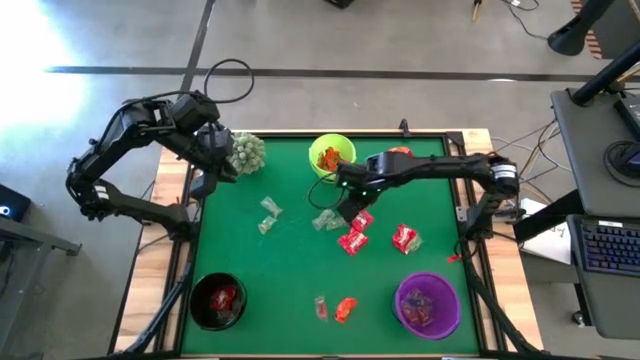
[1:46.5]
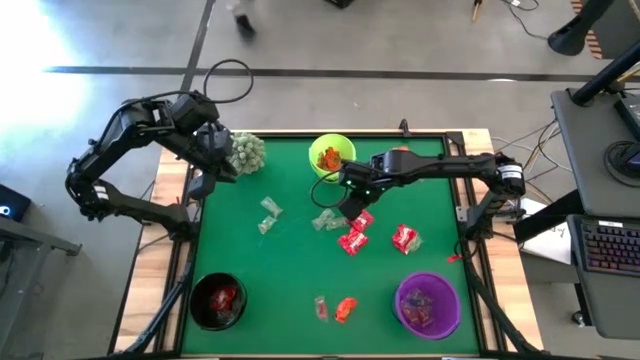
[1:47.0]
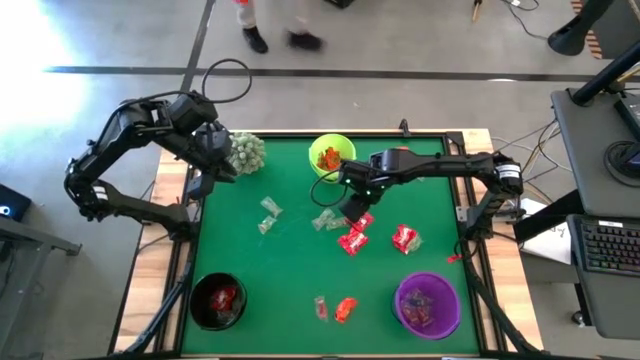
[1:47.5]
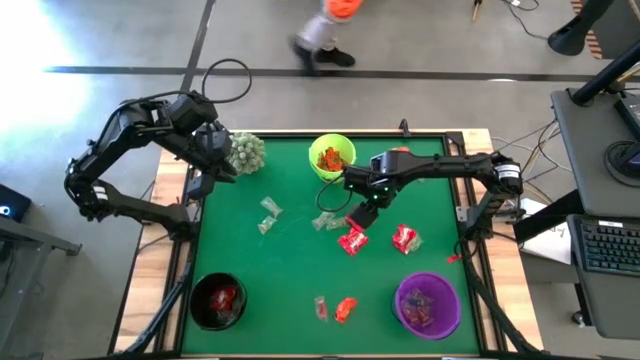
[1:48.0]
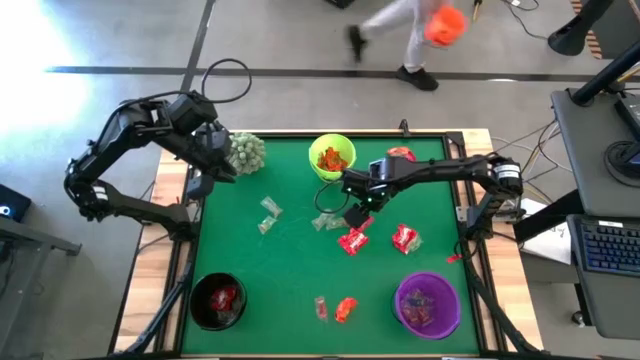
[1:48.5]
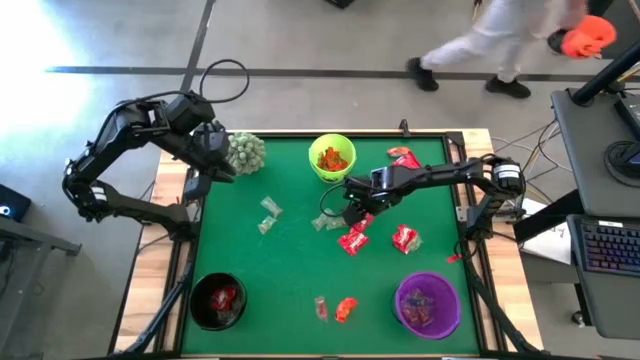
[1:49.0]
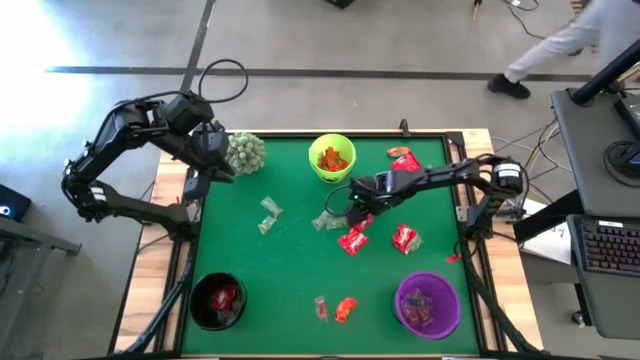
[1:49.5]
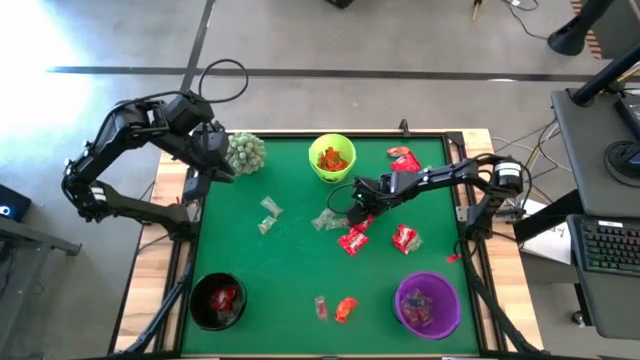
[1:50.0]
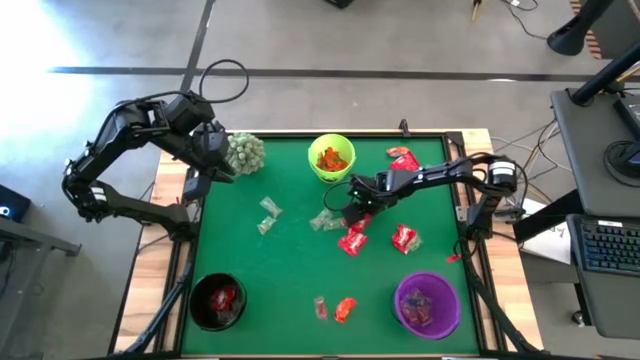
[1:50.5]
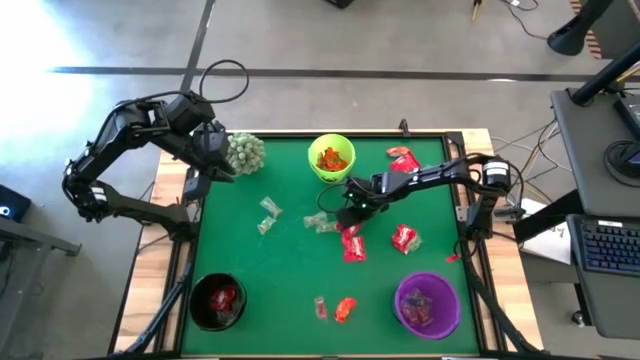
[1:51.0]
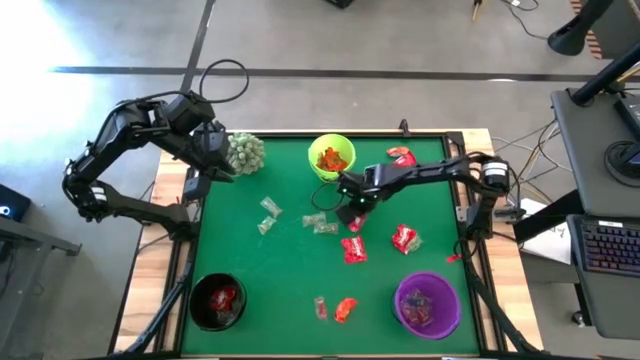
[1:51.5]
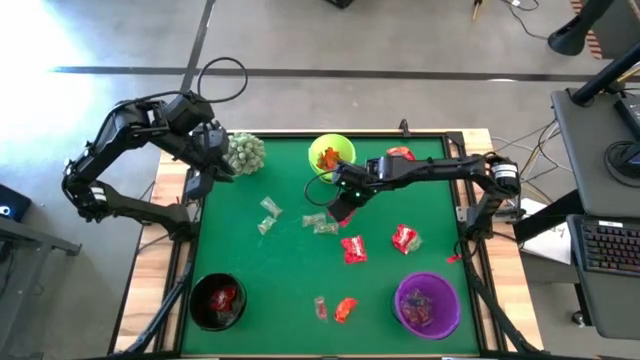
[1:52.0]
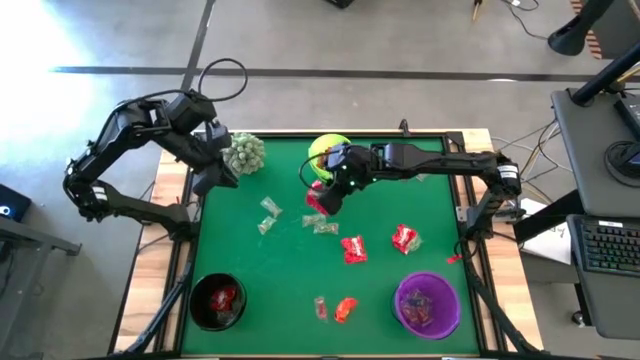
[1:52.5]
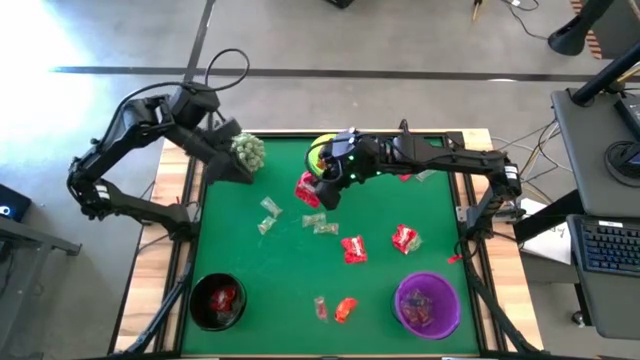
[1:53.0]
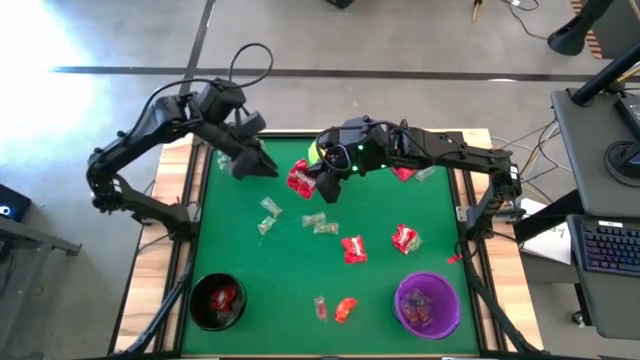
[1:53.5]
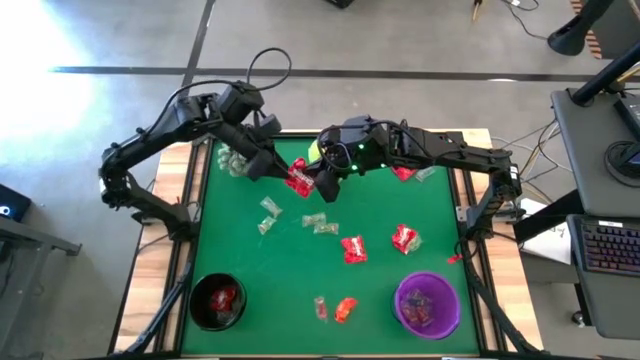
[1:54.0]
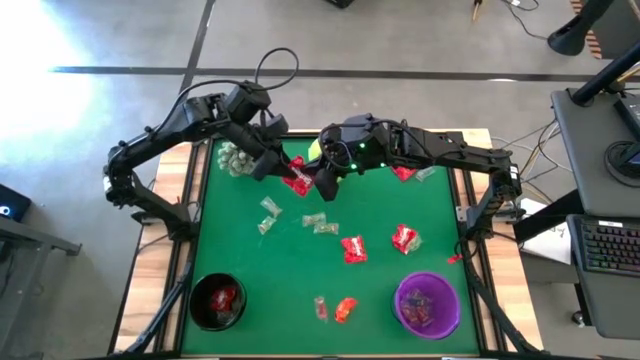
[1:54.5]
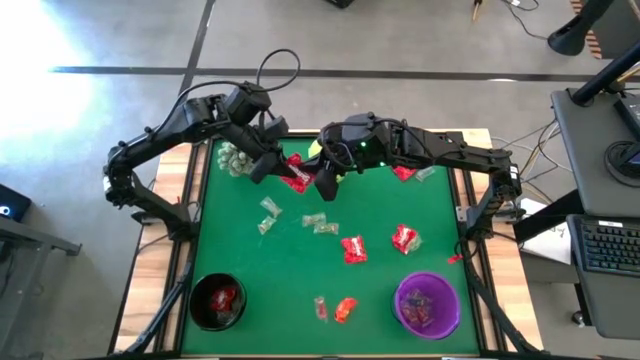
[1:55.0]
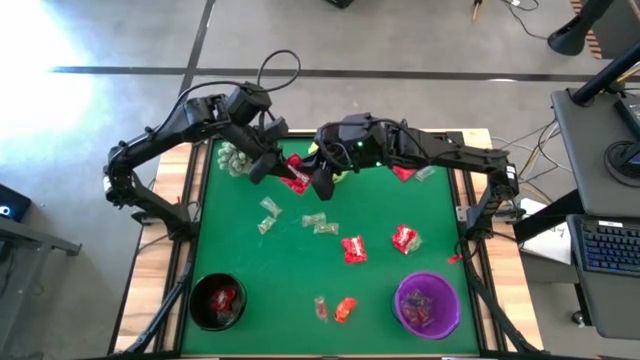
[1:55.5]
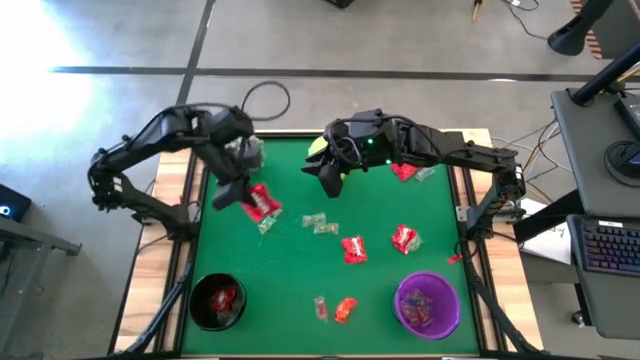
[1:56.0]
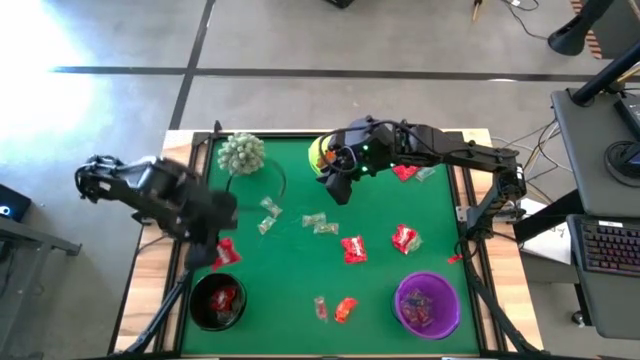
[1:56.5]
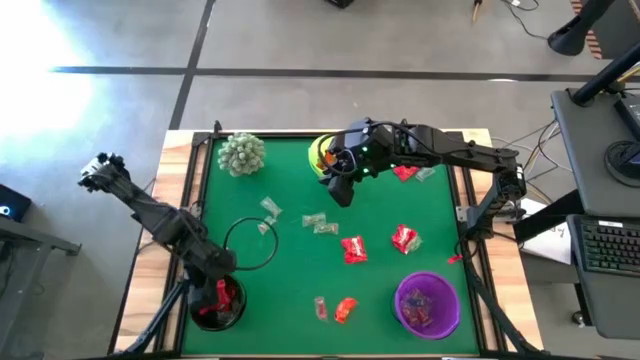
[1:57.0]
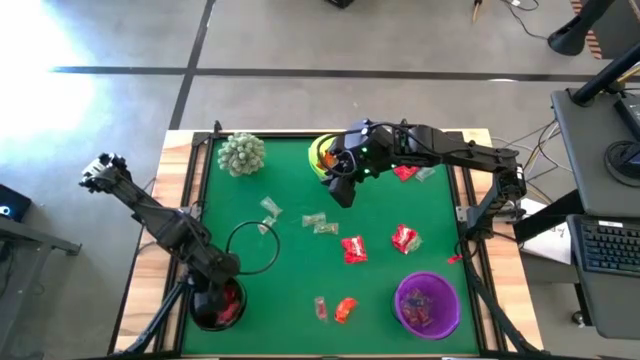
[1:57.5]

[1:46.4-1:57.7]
Task: Organize candy in baskets
Put the red candy into the black bucket

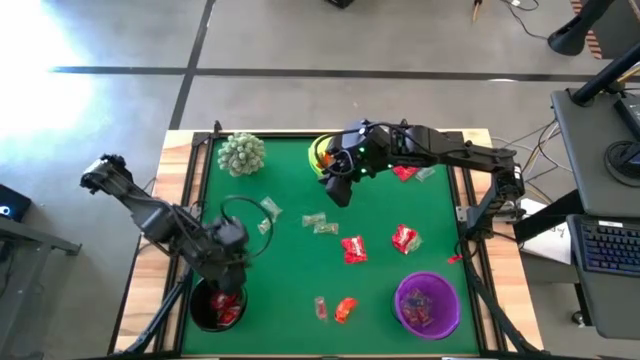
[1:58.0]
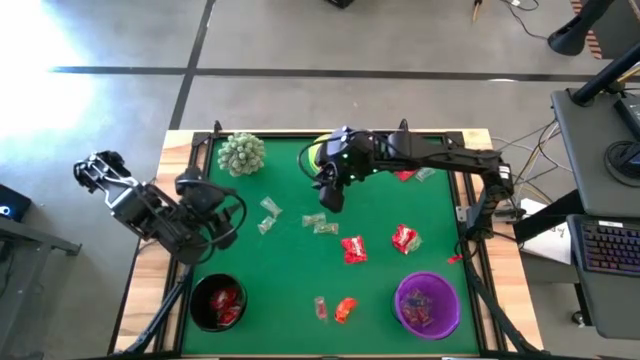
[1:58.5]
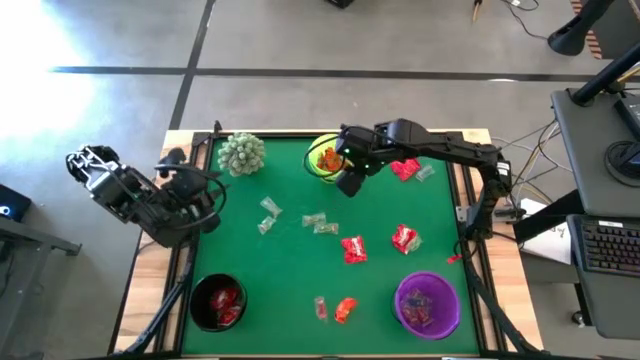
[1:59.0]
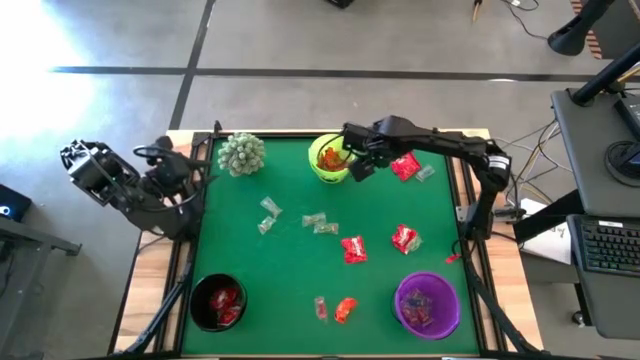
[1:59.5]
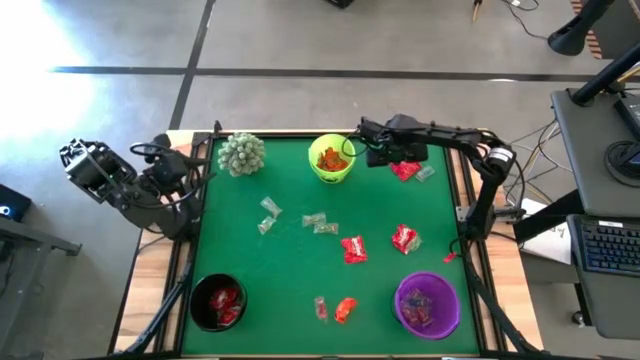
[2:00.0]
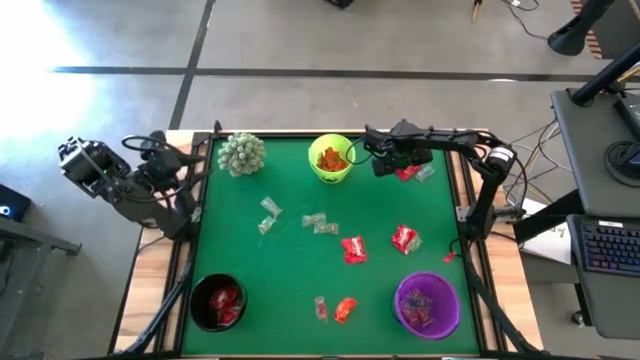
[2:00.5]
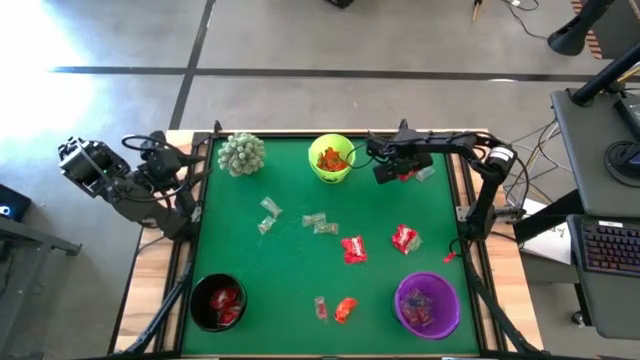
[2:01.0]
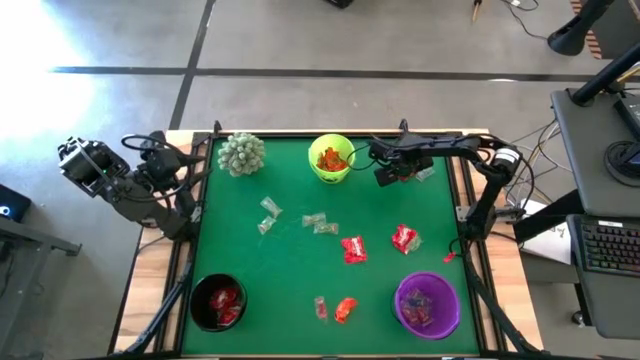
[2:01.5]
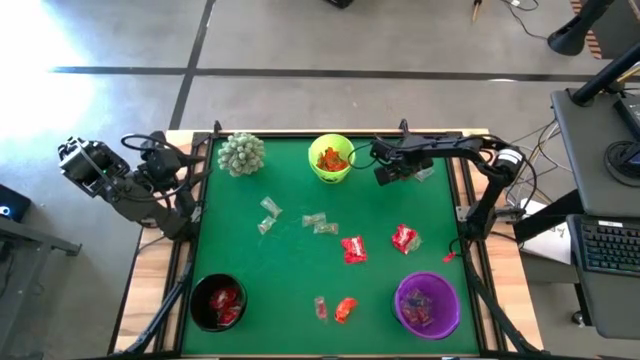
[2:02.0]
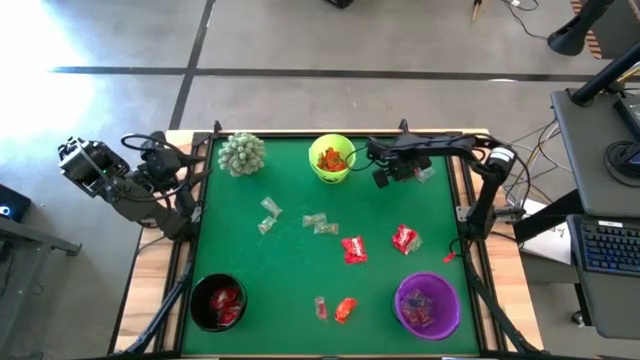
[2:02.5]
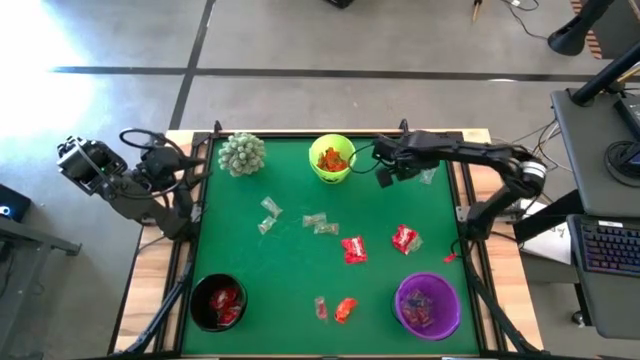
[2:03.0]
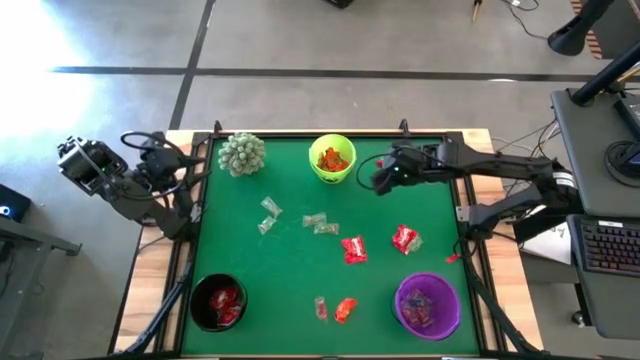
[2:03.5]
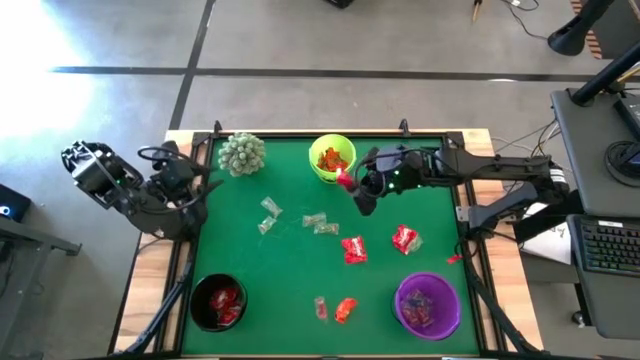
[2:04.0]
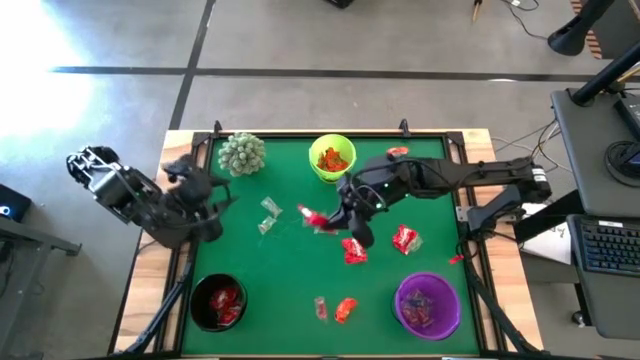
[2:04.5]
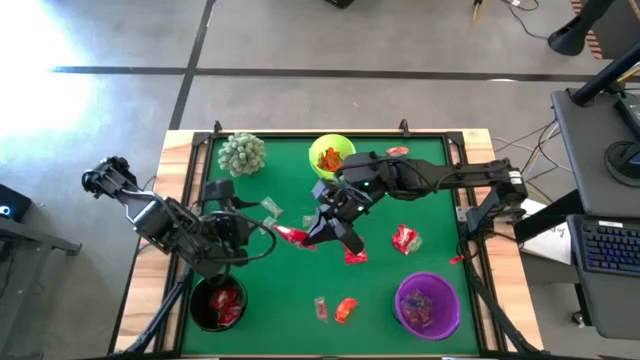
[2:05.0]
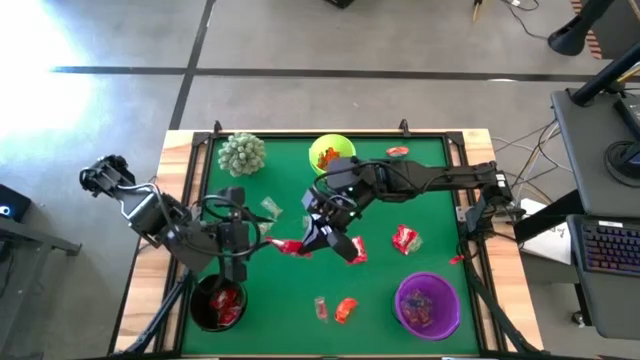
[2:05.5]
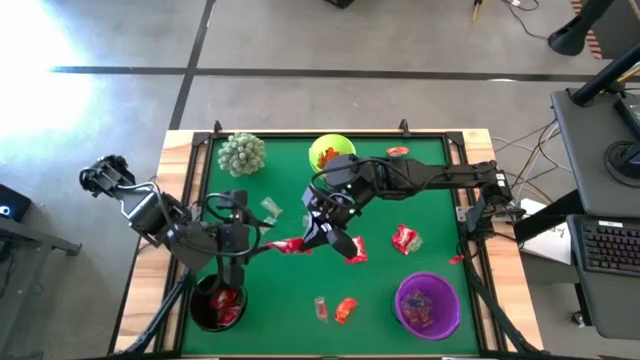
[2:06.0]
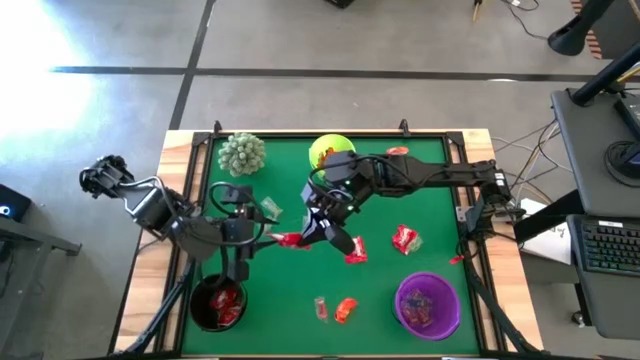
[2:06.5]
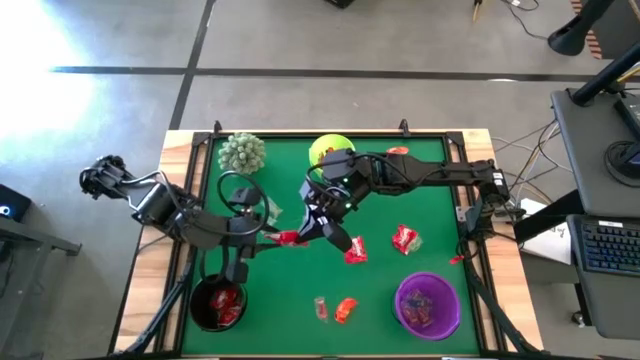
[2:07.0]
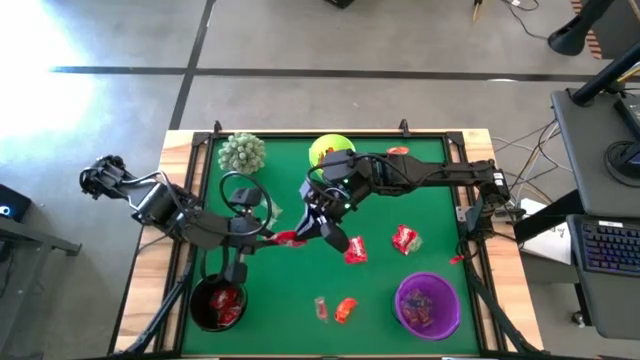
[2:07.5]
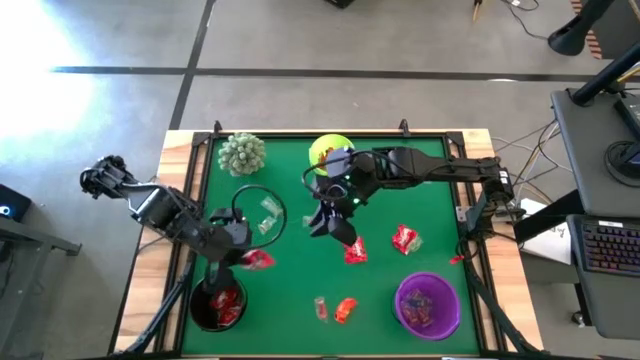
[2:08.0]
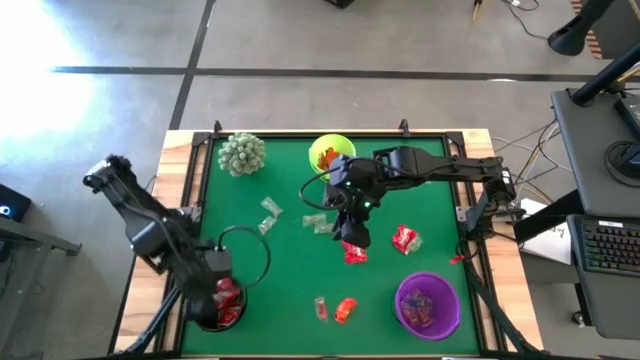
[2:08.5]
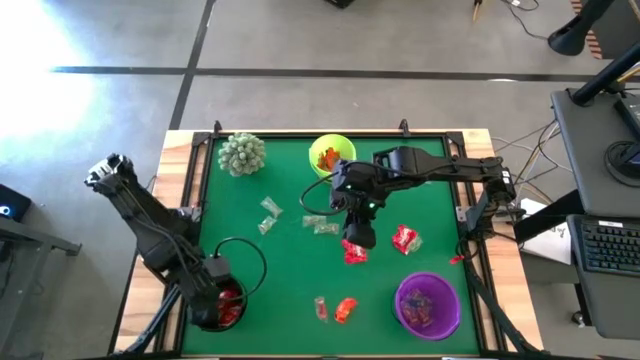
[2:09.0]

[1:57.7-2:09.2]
Put the red candy into the black bucket
